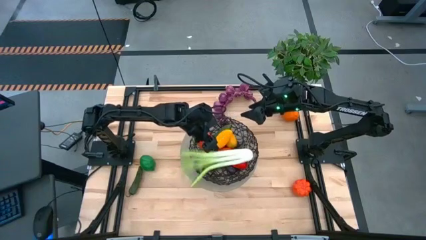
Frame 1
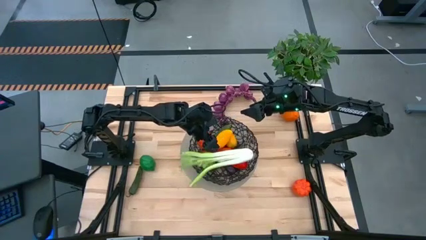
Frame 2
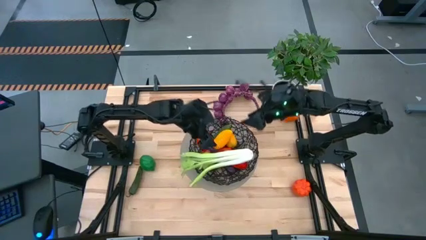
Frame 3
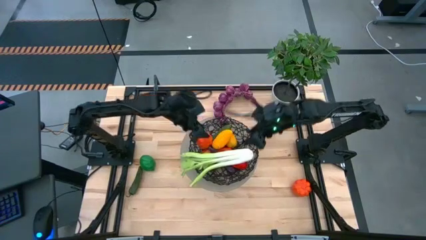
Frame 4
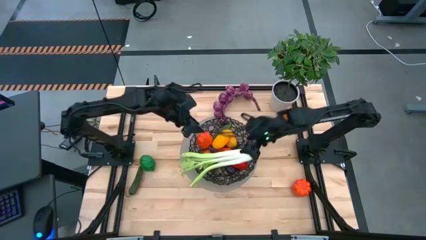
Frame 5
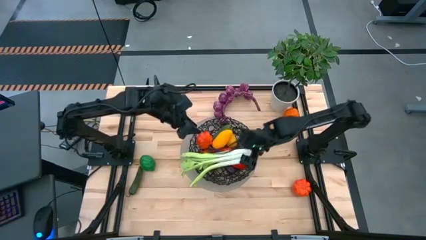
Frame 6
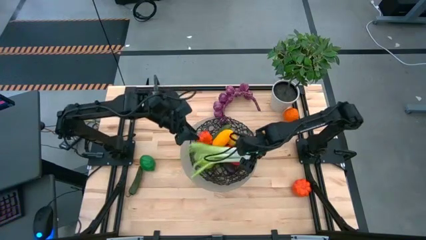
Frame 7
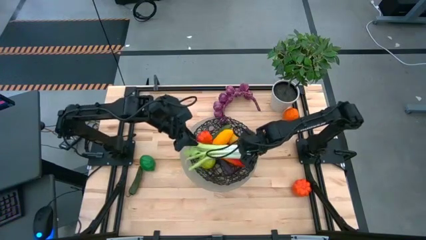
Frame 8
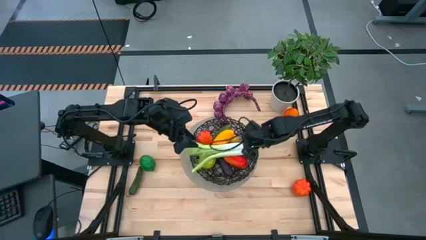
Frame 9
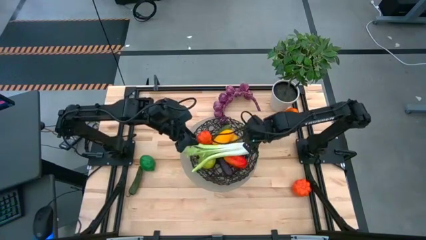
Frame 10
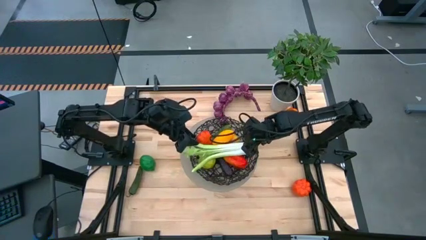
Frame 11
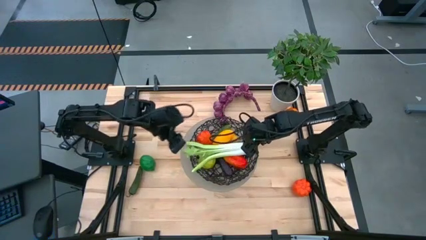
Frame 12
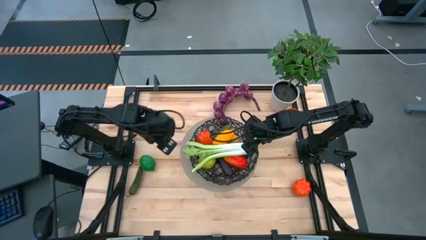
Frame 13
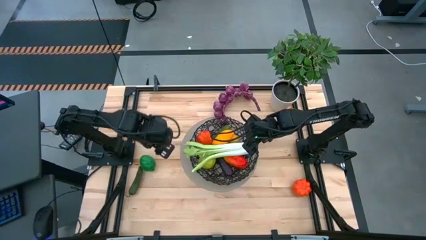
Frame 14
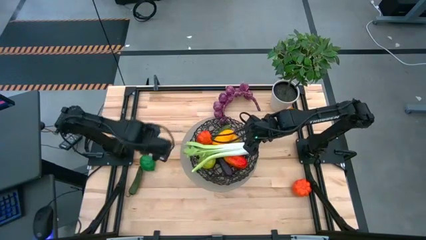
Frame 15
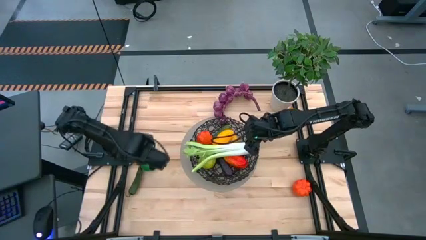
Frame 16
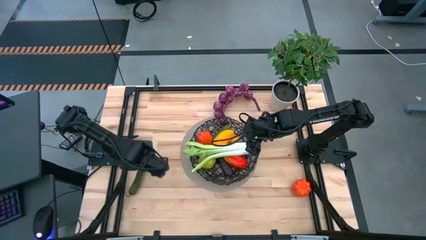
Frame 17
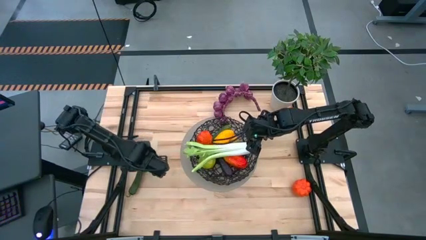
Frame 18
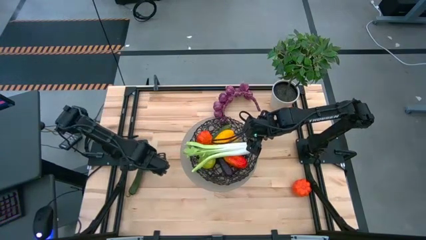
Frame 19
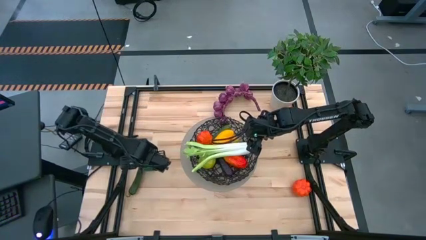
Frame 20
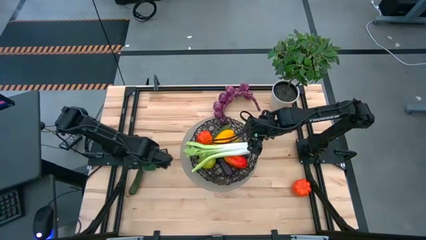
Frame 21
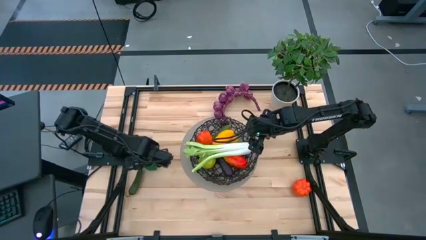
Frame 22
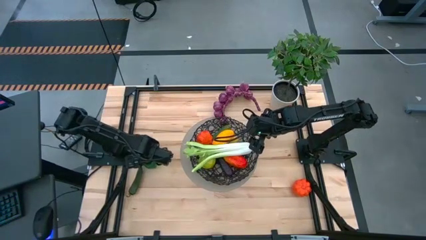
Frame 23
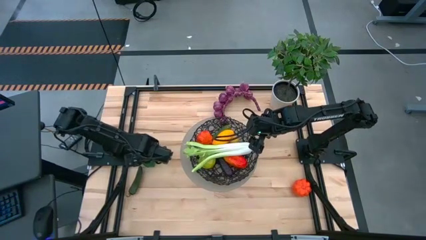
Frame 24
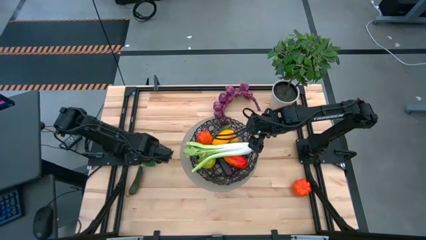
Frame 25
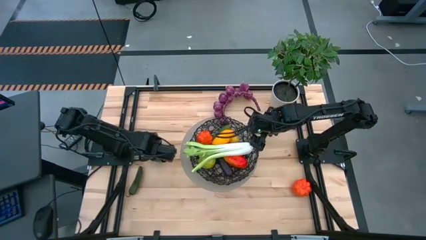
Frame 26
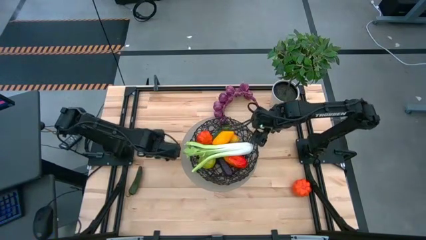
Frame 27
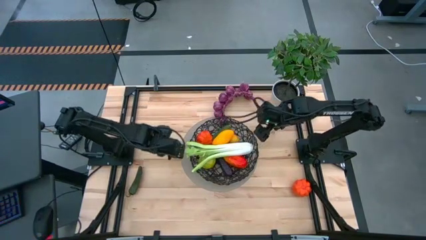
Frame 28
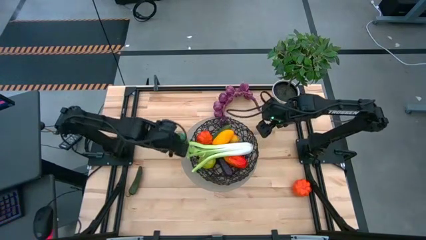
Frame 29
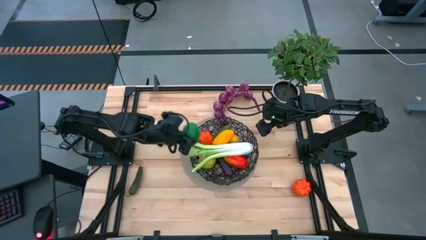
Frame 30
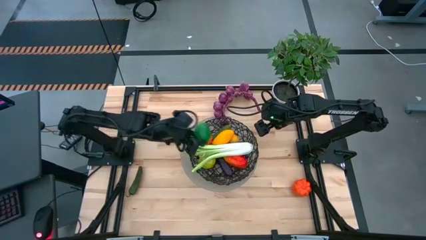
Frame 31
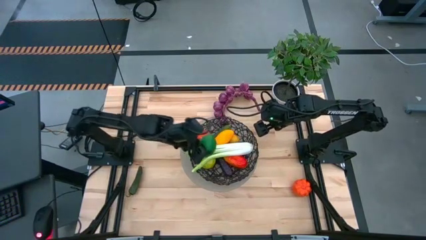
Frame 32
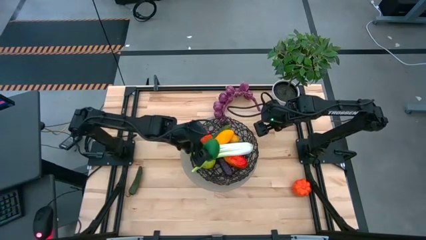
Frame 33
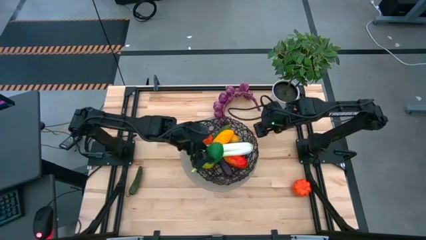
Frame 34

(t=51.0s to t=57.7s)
Task: Build produce basket
Put the green lime into the black wire basket

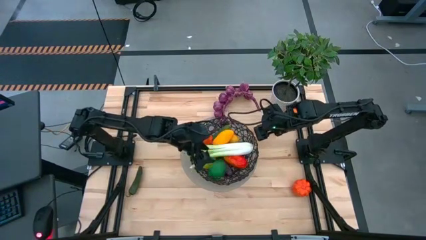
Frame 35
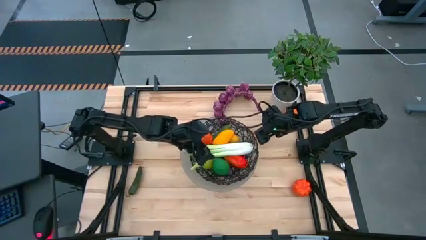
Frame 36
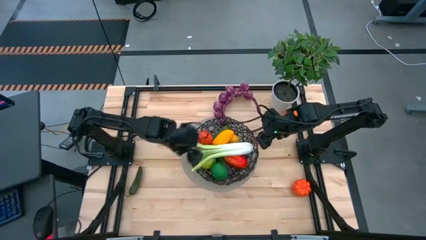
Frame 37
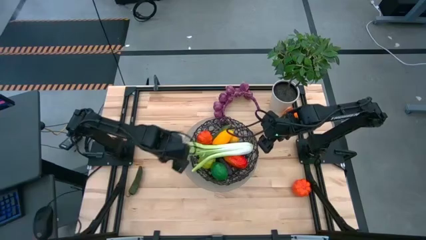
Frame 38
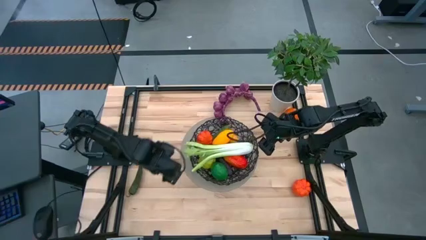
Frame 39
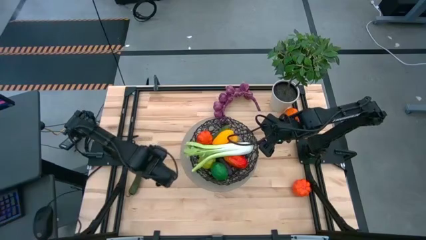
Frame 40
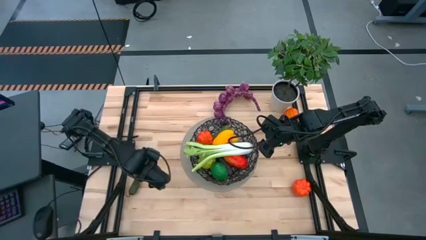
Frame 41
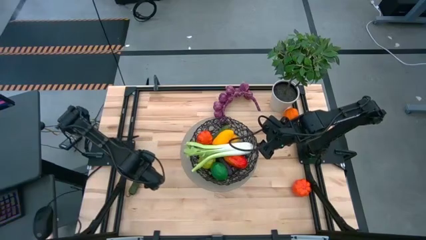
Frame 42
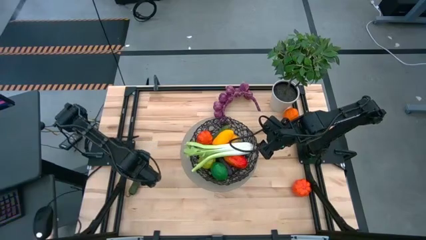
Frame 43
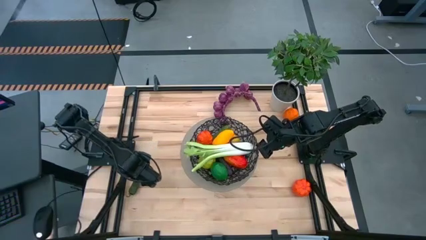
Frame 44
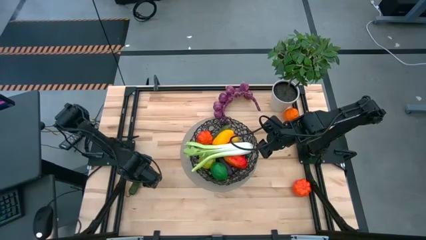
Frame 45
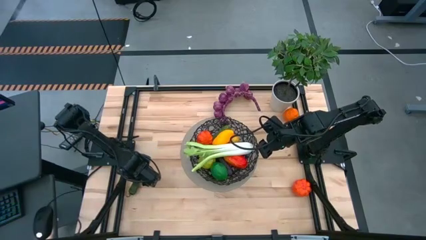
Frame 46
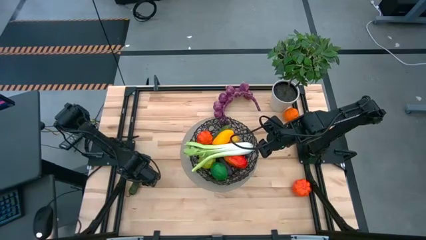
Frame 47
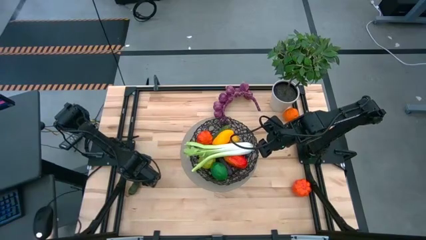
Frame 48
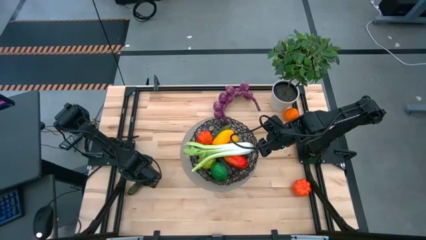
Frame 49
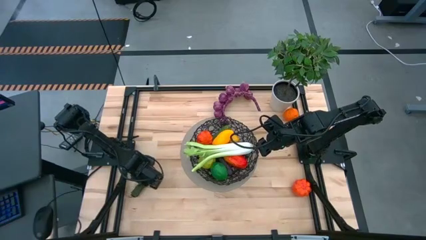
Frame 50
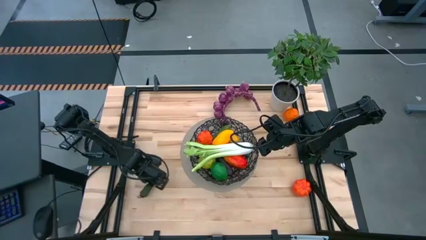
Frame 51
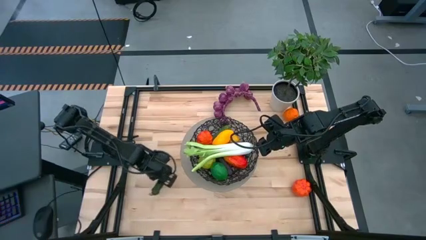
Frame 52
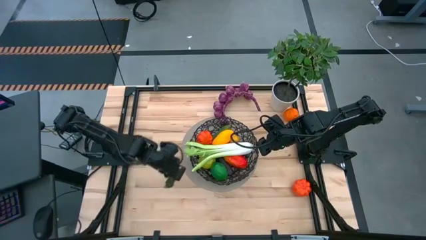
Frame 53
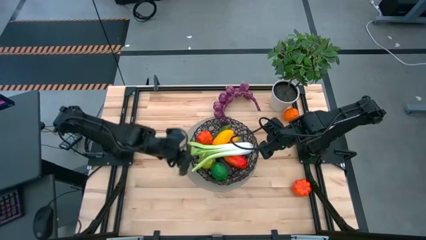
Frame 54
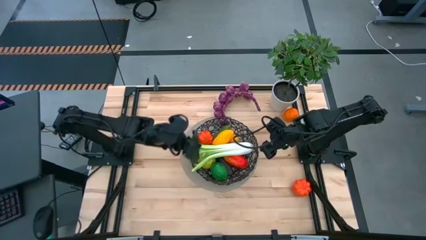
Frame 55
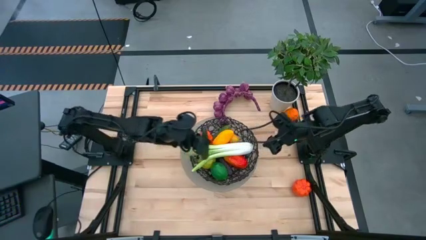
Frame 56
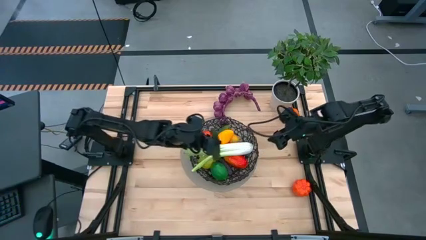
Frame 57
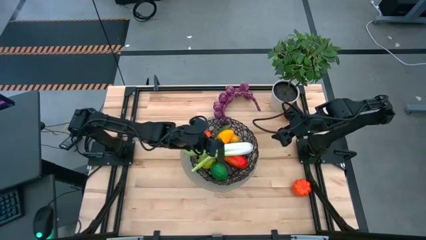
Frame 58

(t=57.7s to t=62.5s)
Put the green chili pepper into the black wire basket

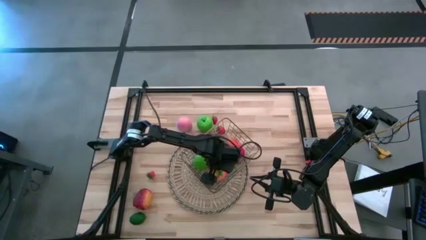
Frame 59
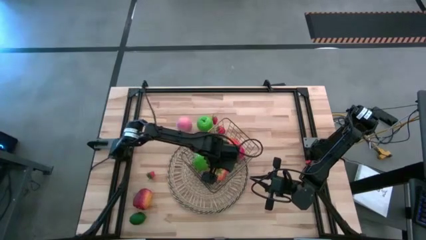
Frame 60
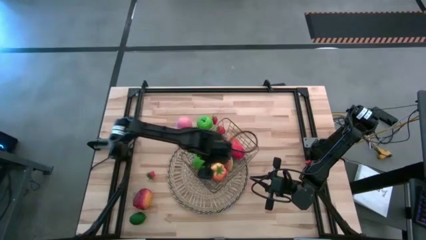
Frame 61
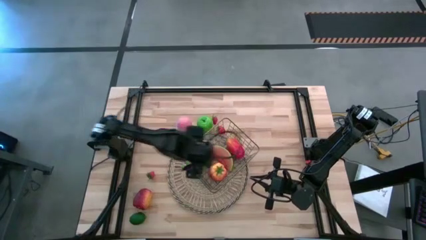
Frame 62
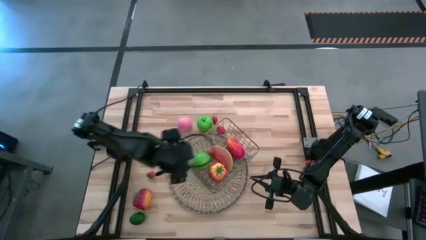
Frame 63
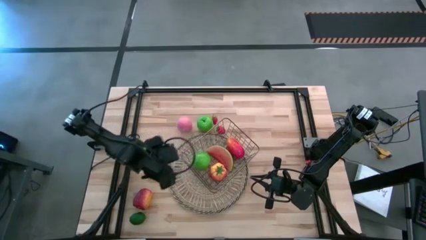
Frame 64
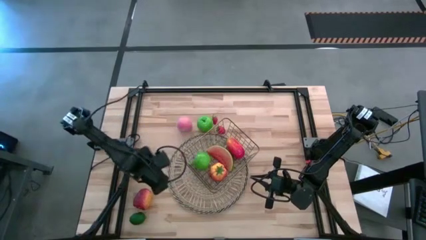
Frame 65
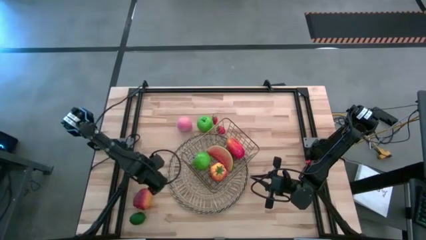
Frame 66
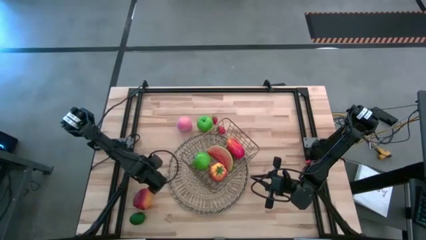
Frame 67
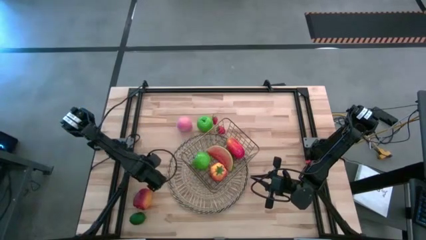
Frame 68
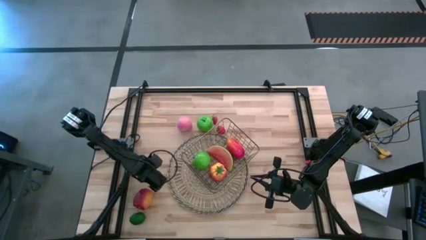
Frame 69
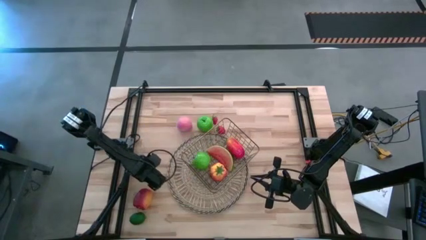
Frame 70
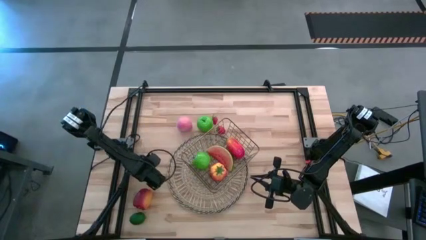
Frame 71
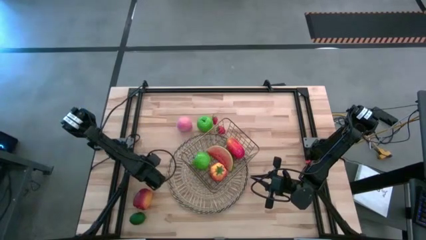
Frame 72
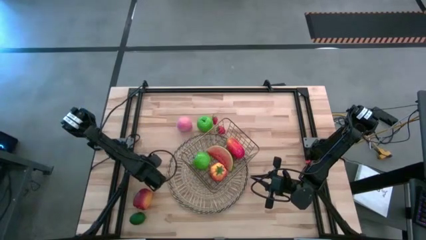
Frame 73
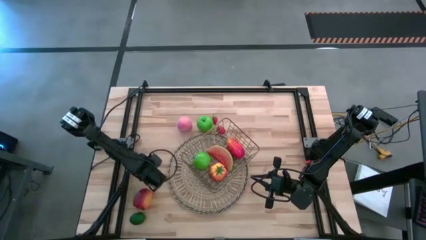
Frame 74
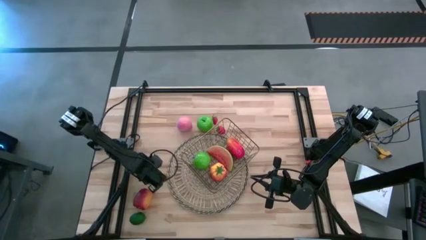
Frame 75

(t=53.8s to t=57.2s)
Task: Build produce basket
Put the bottom strawberry into the gold wire basket

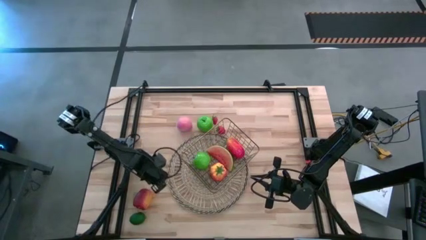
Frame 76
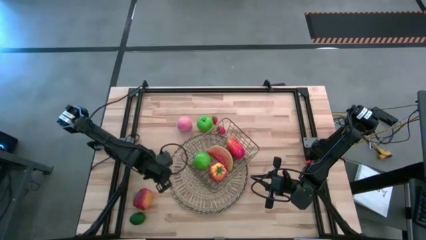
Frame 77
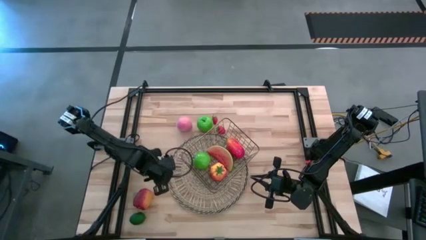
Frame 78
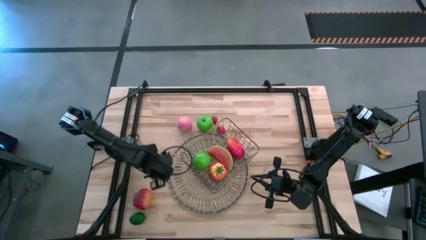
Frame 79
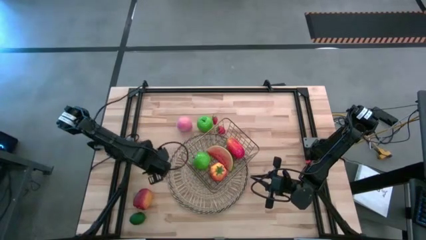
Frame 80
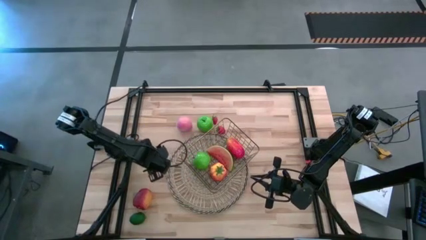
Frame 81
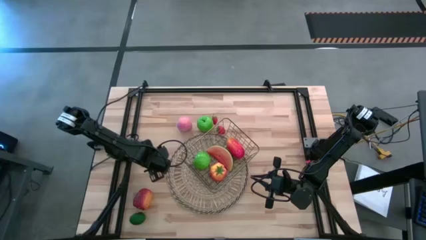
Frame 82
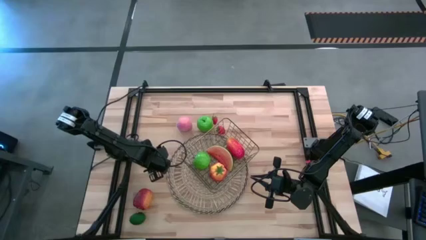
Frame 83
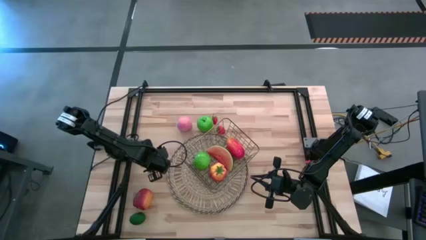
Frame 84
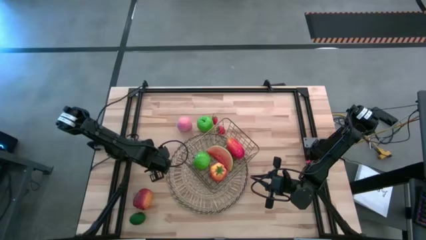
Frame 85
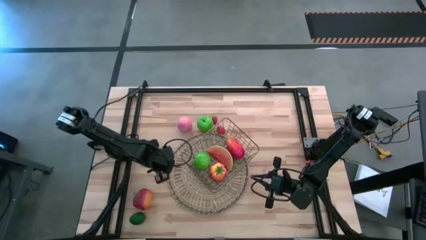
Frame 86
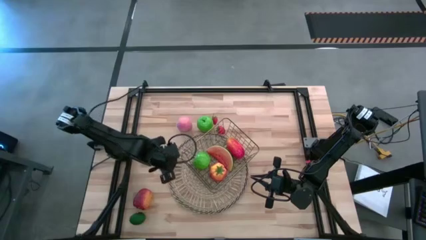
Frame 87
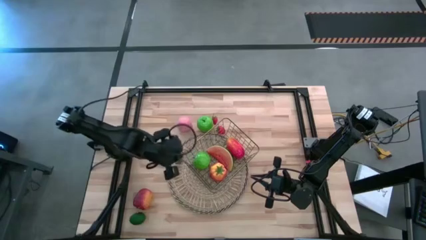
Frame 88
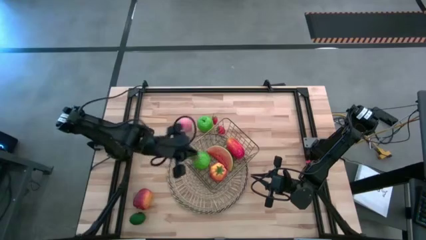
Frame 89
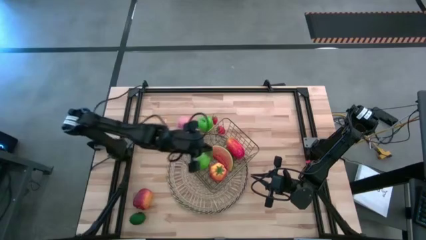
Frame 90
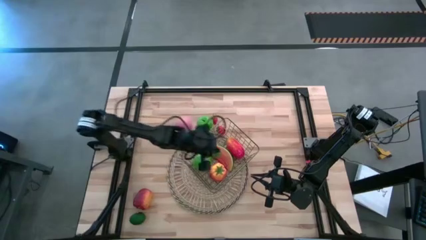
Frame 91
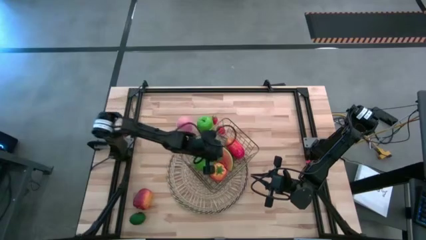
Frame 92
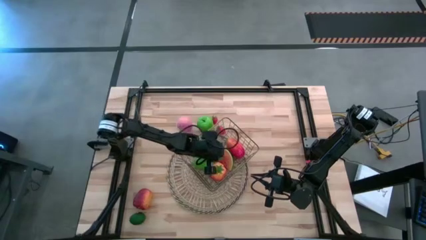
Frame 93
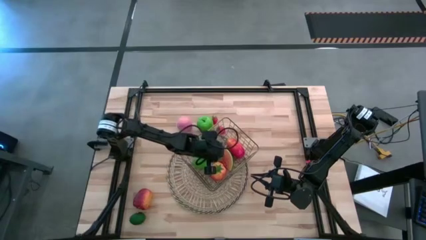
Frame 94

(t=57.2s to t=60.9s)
Put the bottom strawberry into the gold wire basket
